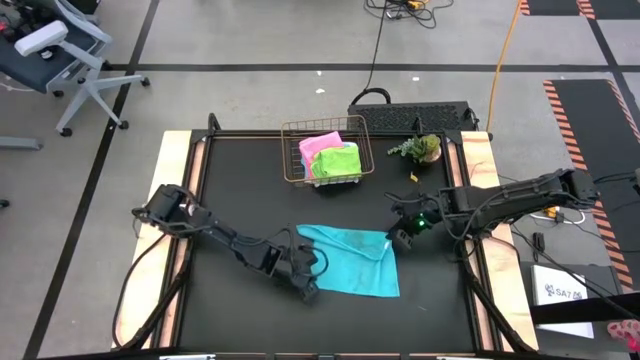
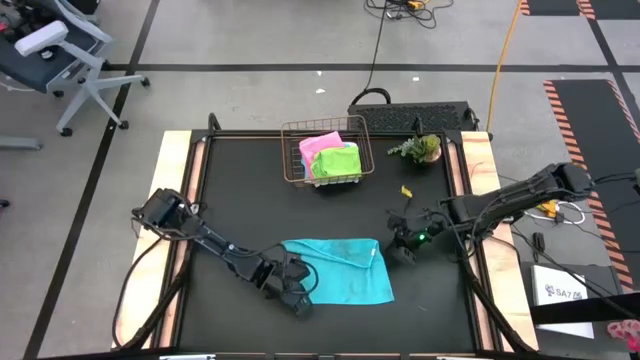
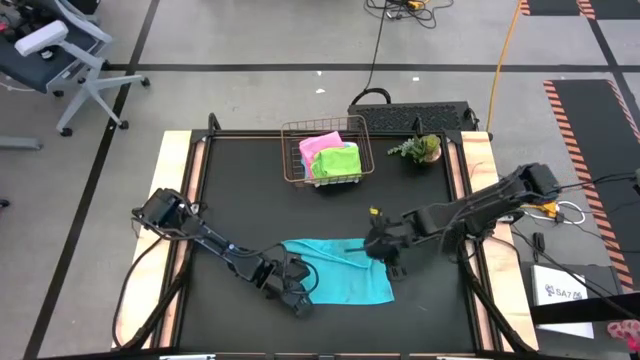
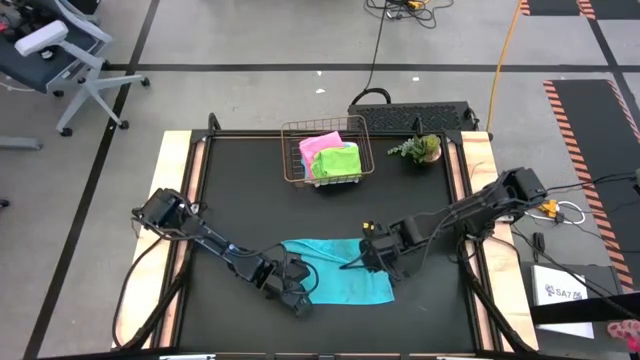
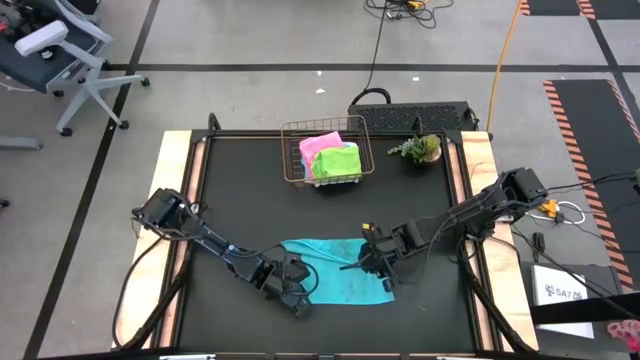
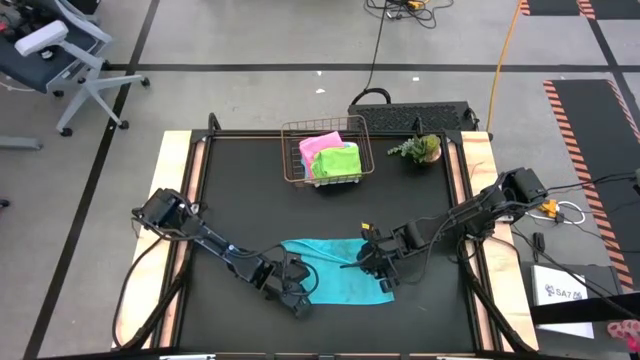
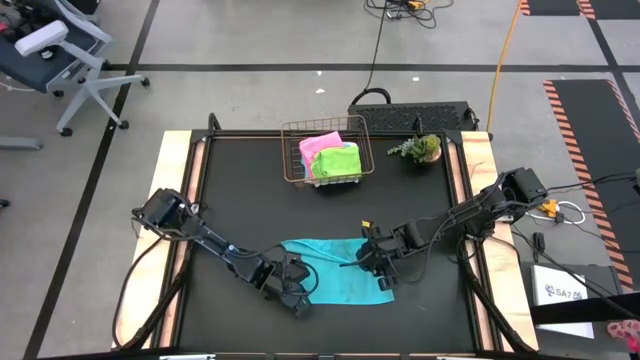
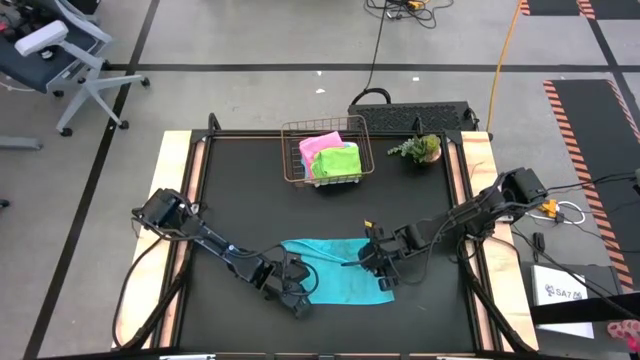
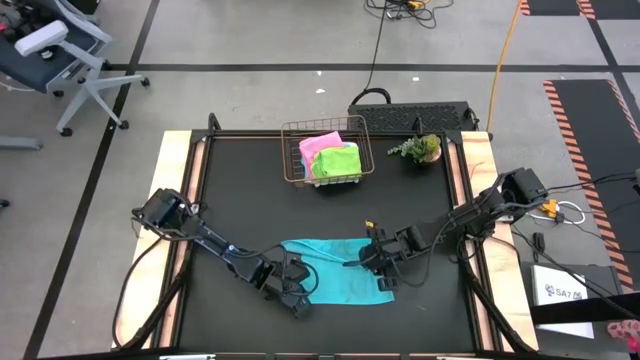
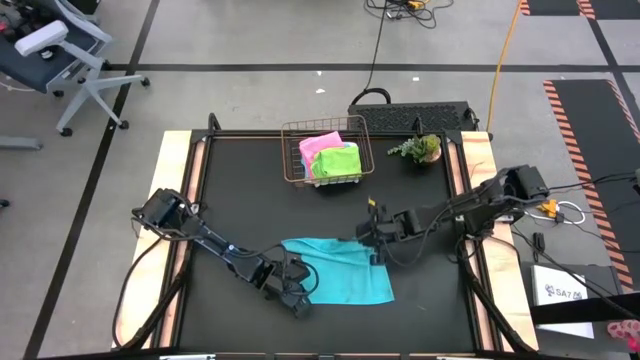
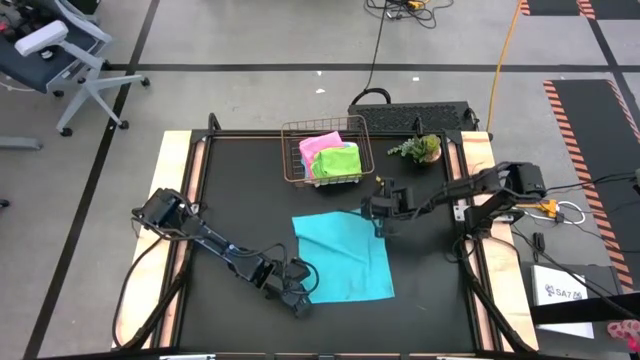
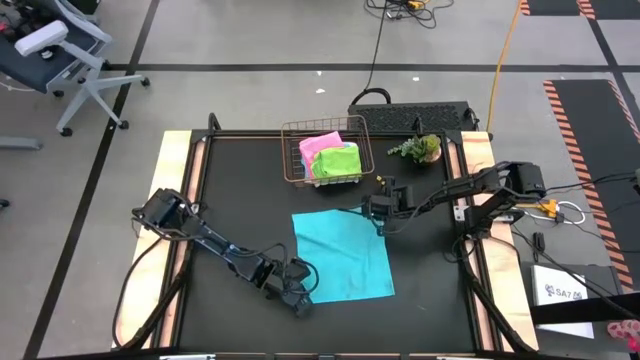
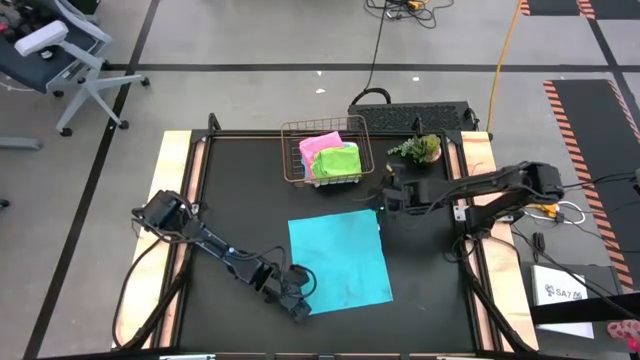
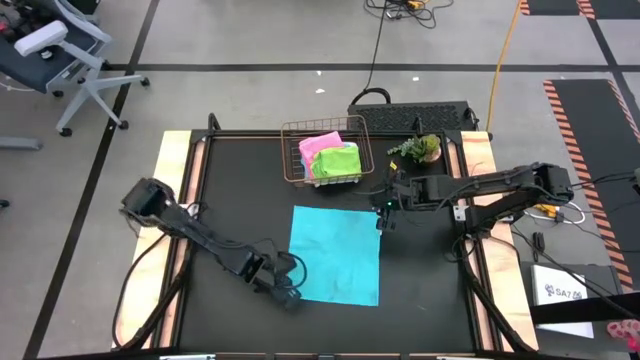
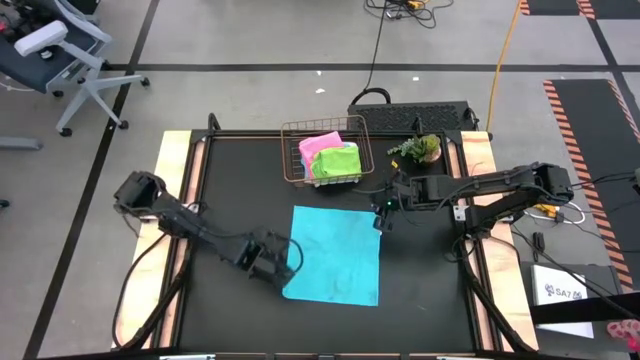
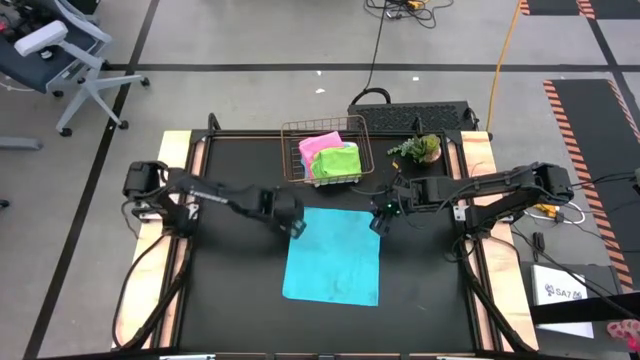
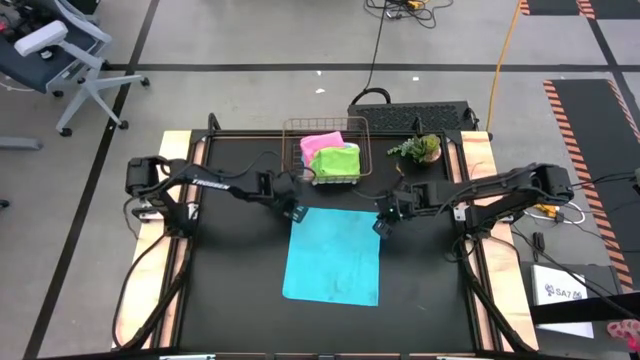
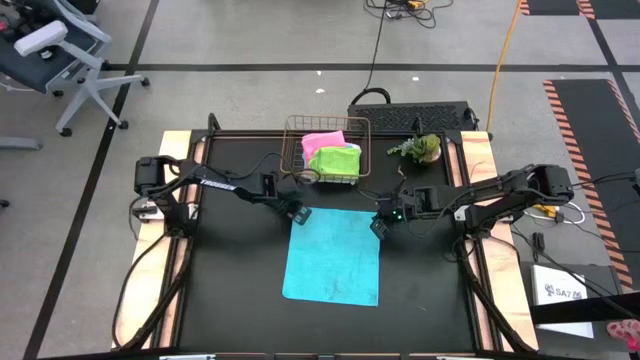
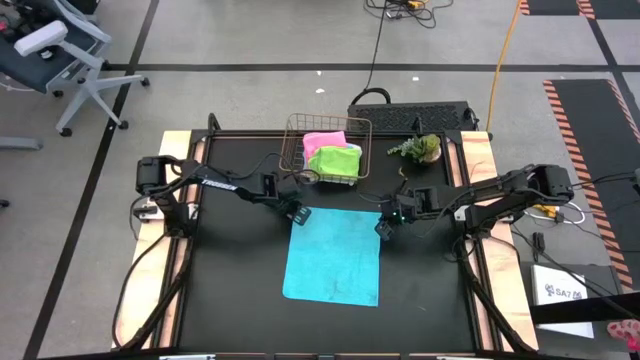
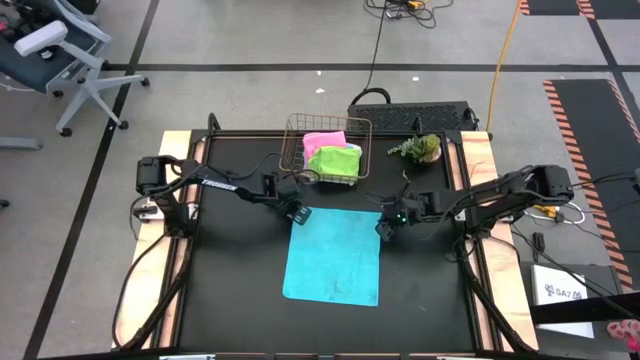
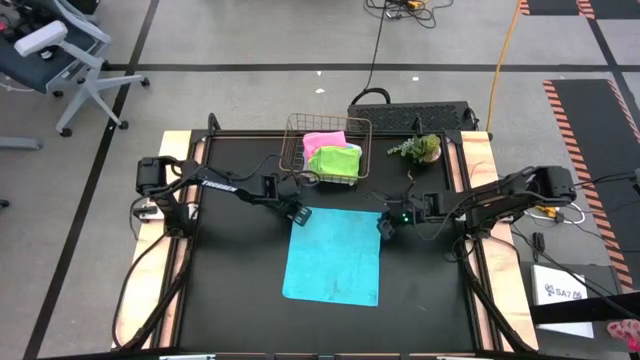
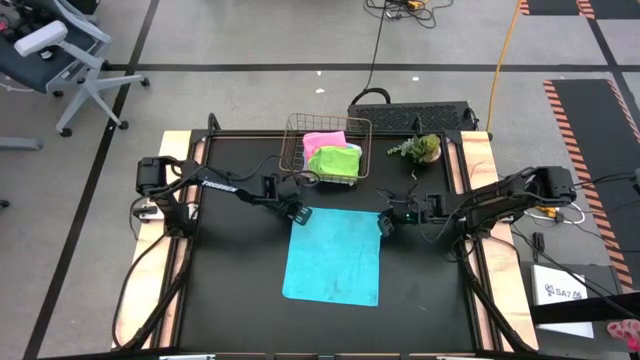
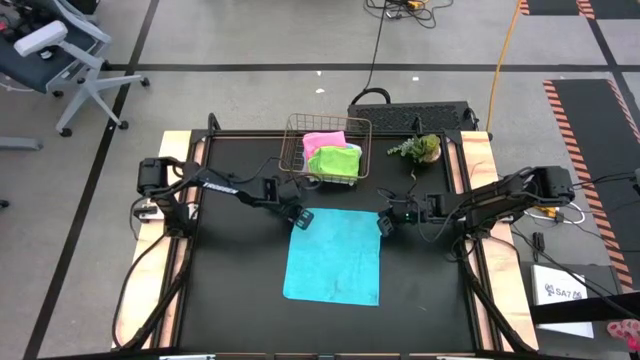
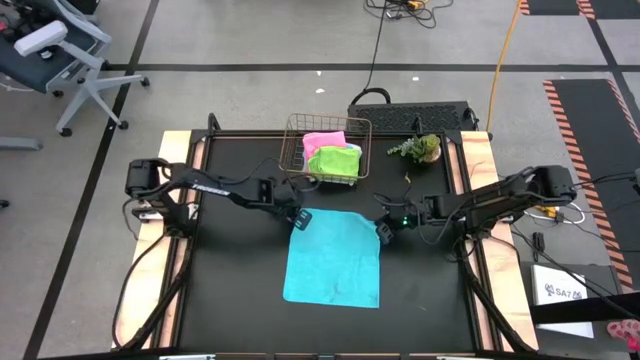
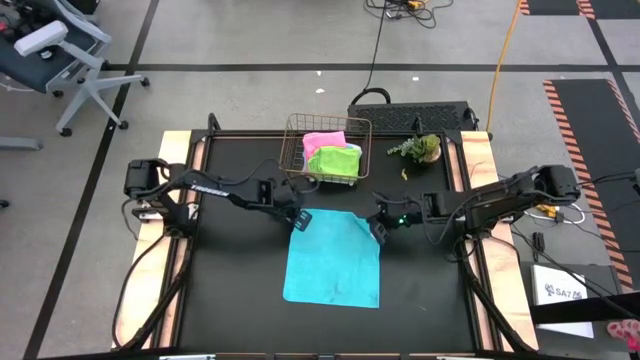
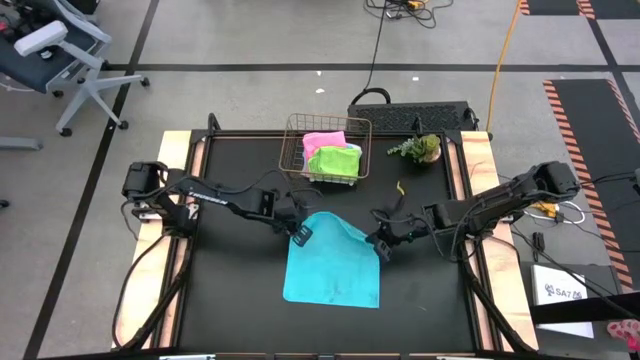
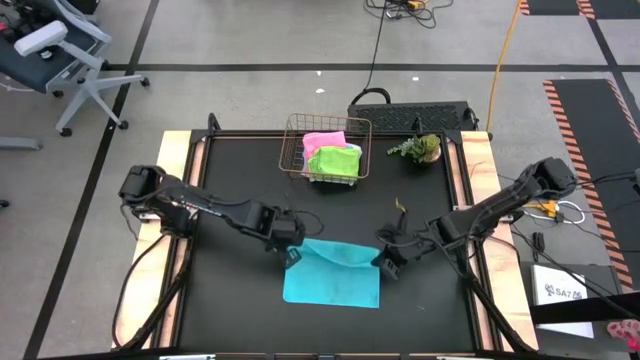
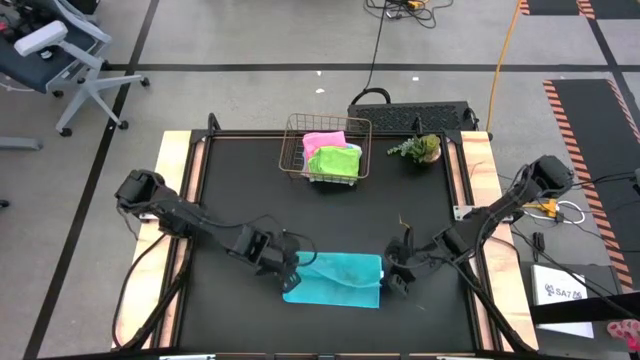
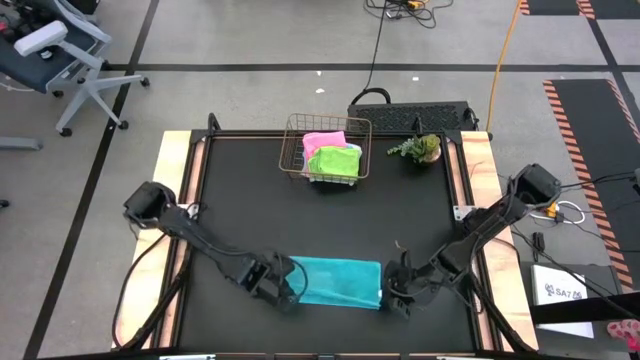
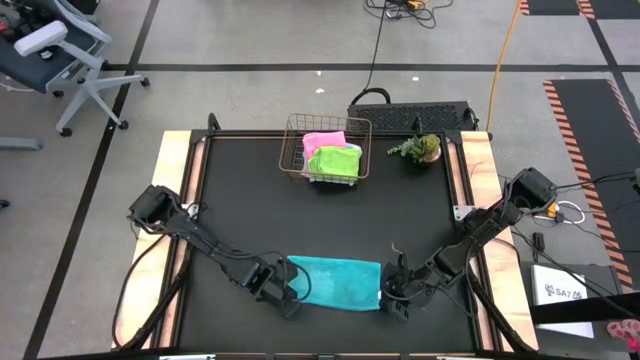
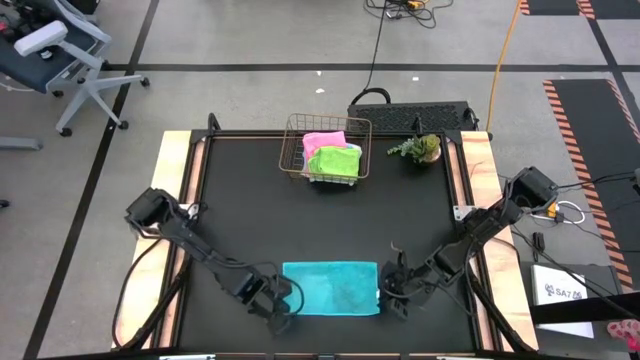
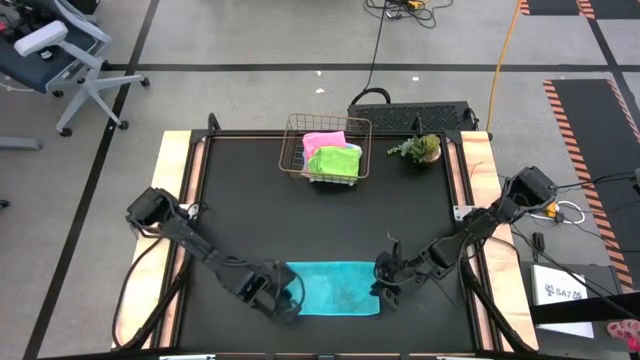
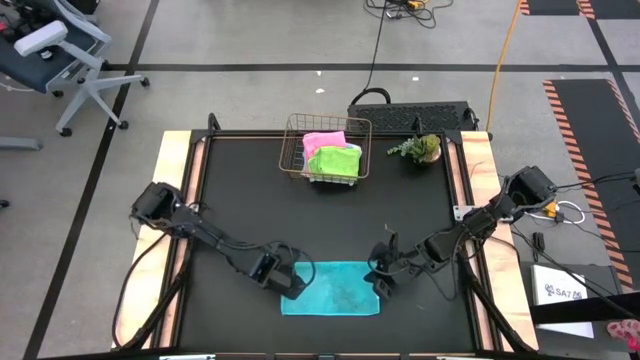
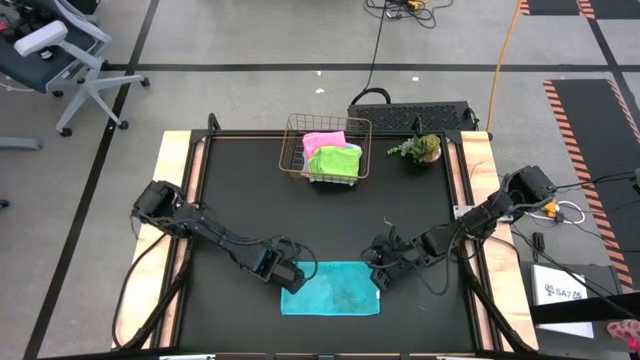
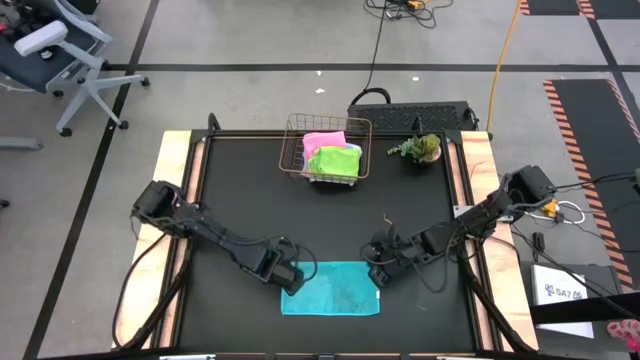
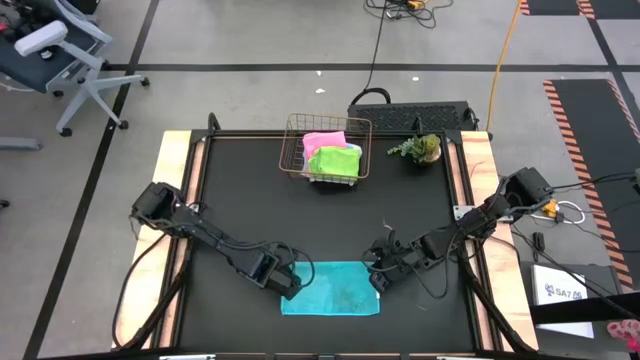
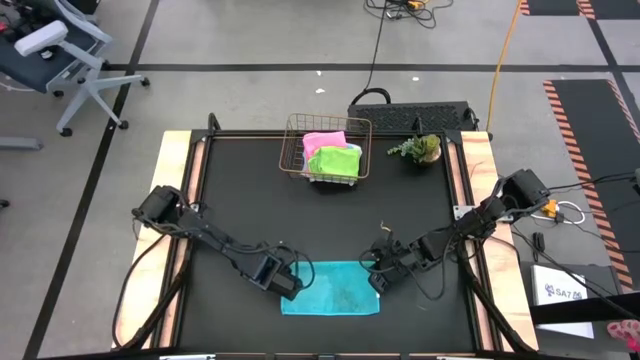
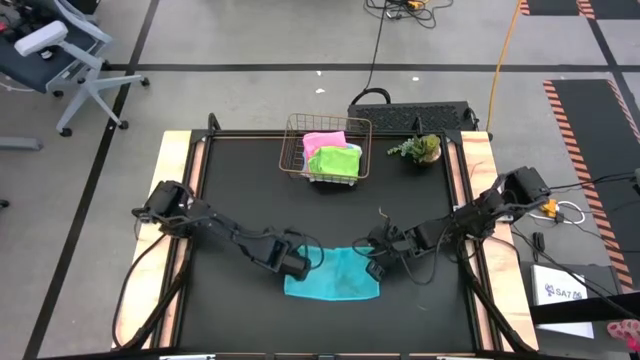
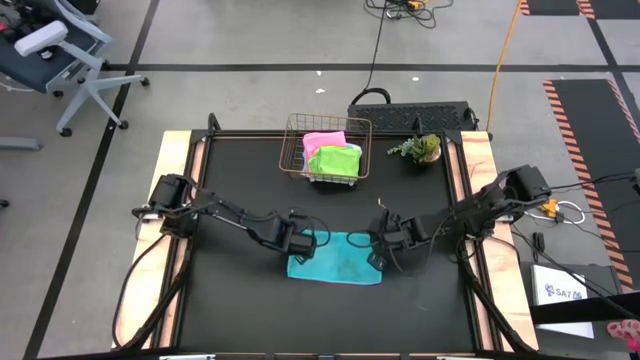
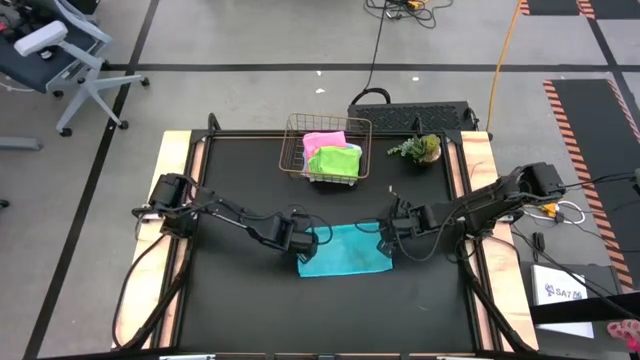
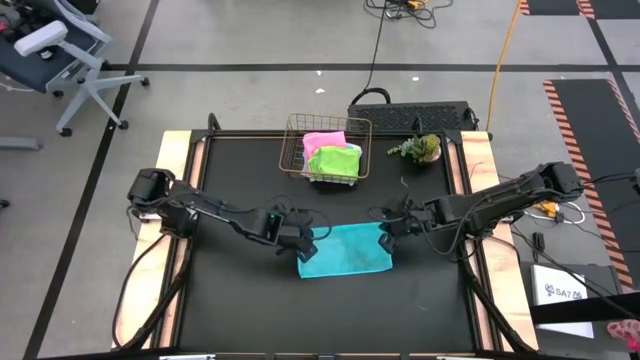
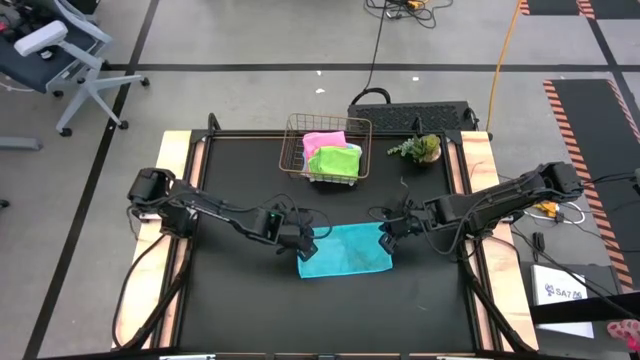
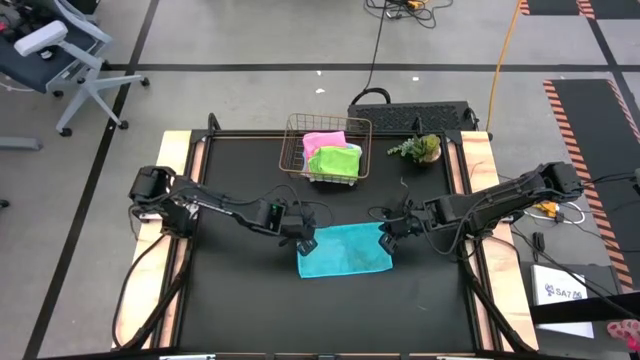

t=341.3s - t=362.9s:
Task: Fold microfiber towels
Fold the blue microfiber cloth
